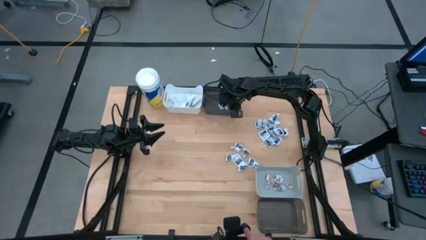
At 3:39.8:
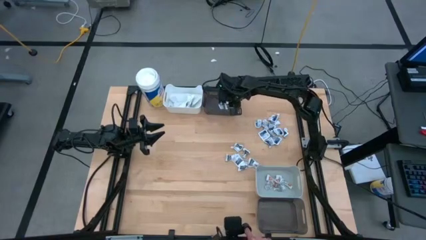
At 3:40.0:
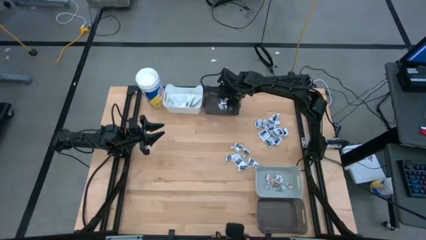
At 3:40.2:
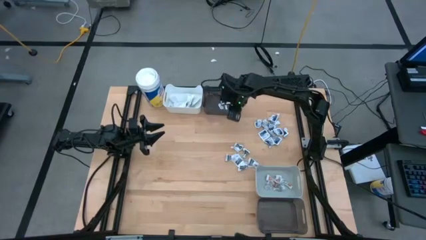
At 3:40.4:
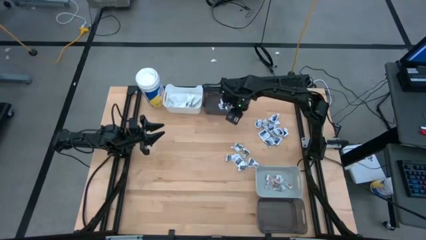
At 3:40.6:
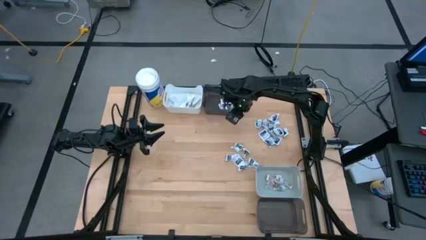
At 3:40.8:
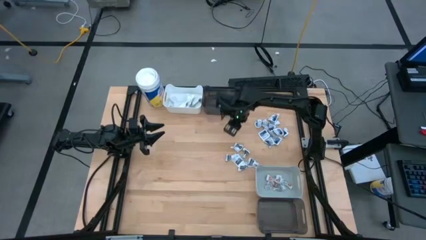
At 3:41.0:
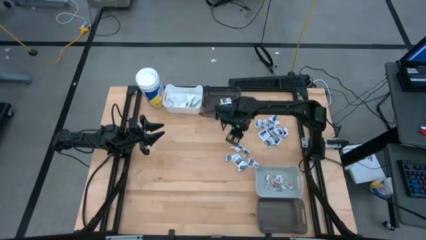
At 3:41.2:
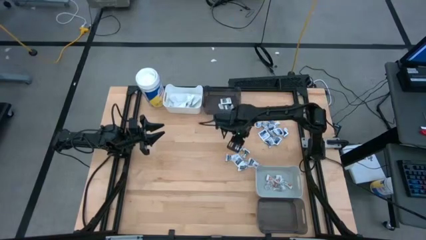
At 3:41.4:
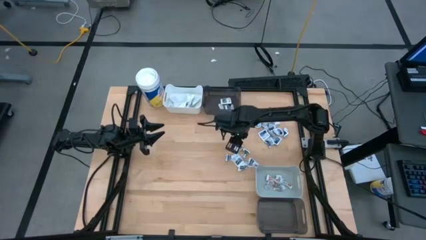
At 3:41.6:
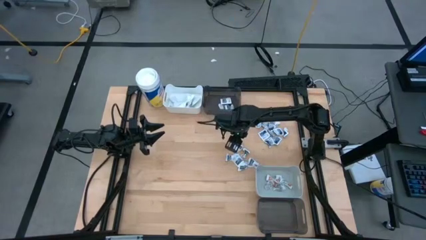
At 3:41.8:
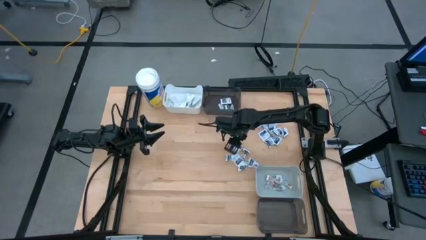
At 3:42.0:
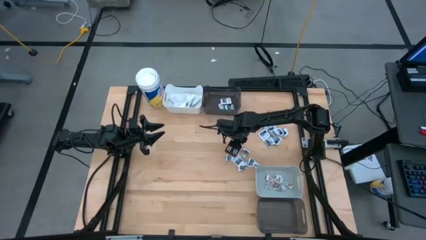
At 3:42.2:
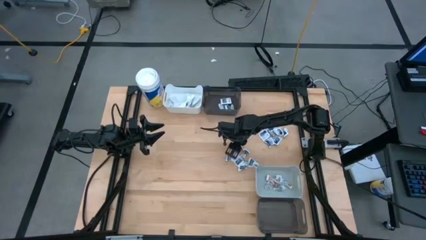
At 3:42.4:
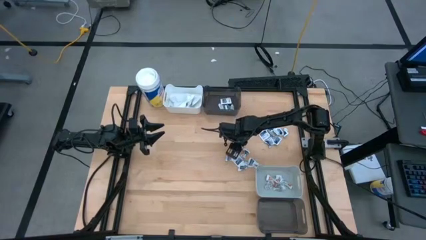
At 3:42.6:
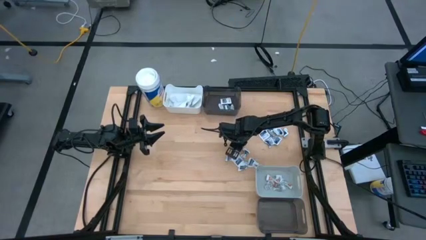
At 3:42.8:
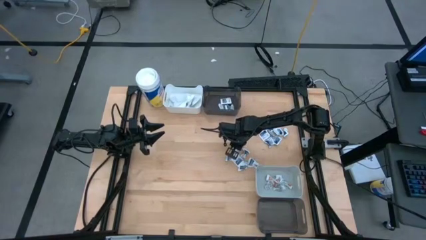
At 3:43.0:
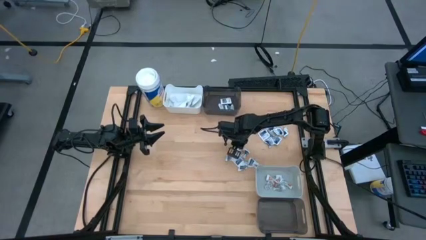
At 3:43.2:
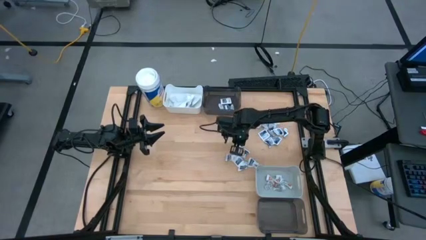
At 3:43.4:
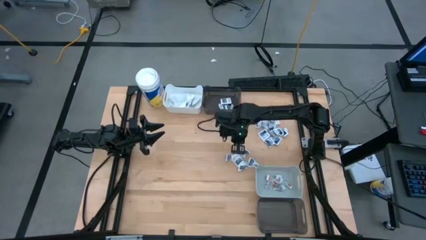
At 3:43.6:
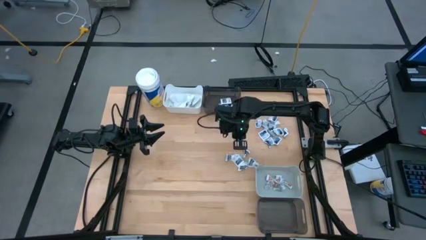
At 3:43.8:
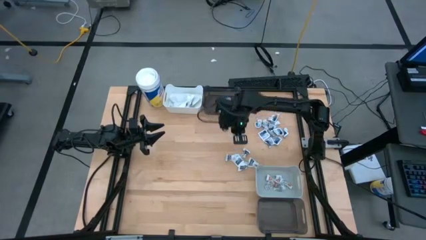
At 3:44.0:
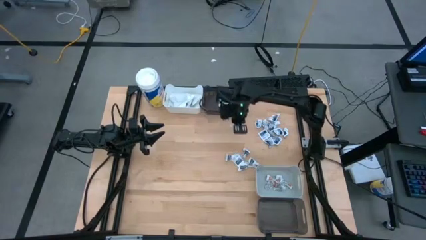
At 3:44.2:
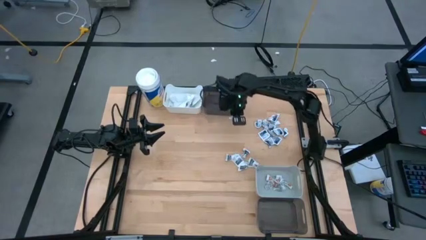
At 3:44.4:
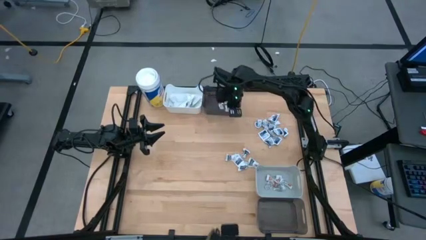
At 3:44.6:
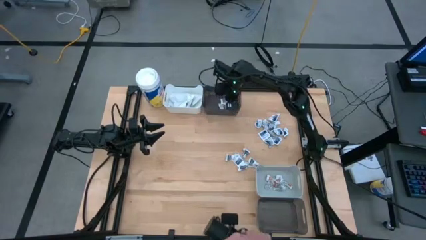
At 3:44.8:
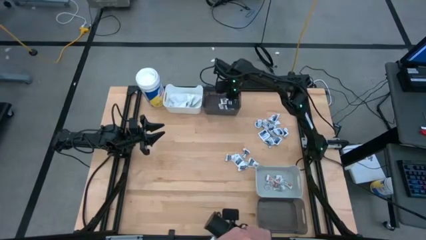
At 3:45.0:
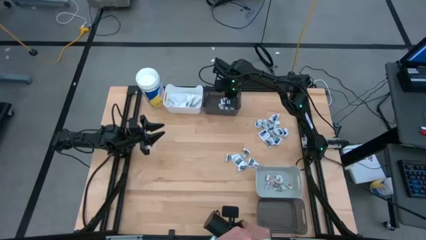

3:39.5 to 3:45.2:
Task: Pick & Place First Aid Supplies
Put the gray towelette pack into the top black bin

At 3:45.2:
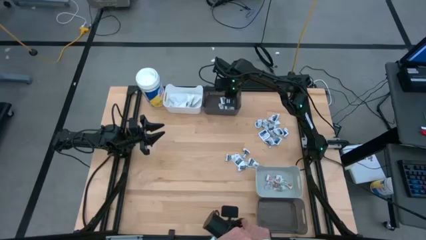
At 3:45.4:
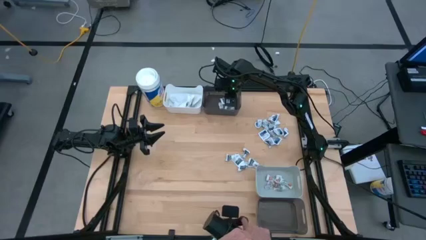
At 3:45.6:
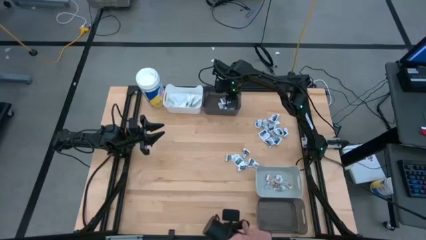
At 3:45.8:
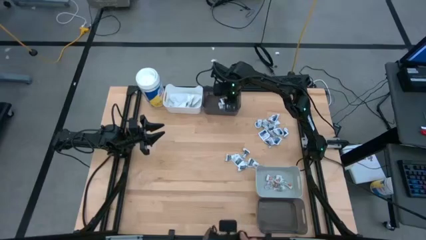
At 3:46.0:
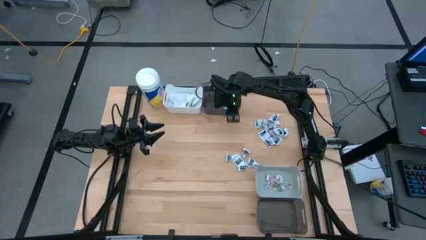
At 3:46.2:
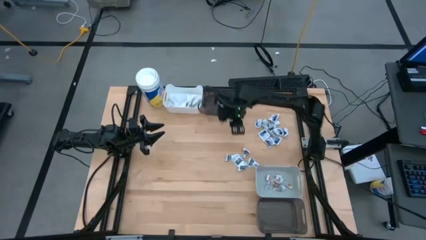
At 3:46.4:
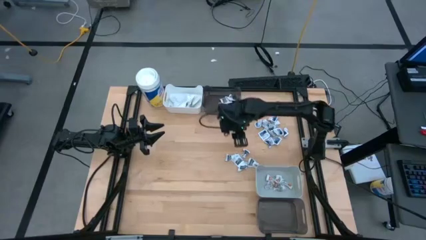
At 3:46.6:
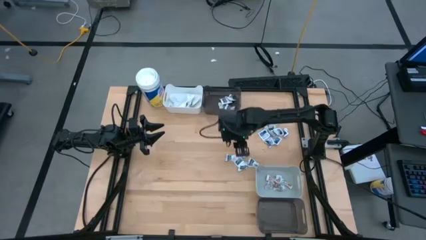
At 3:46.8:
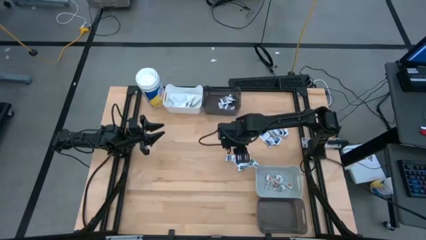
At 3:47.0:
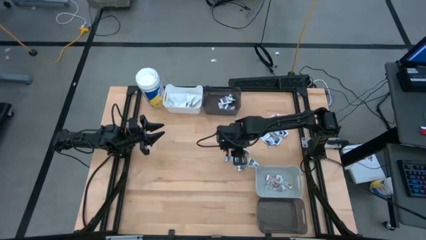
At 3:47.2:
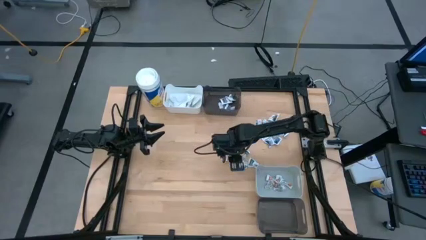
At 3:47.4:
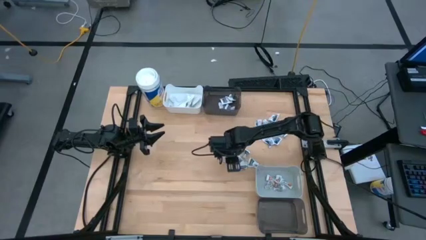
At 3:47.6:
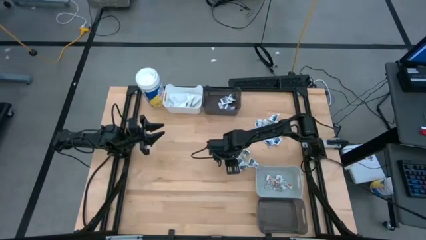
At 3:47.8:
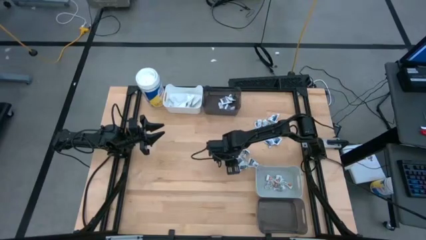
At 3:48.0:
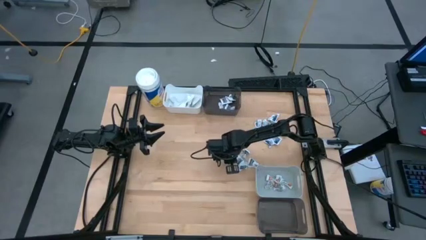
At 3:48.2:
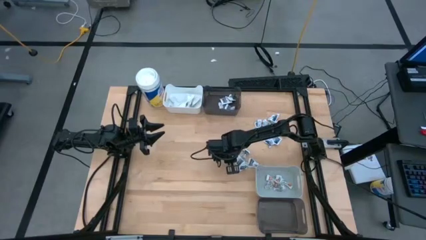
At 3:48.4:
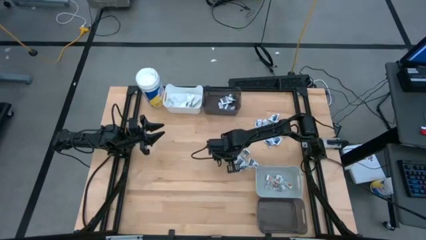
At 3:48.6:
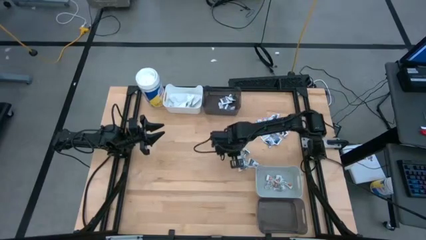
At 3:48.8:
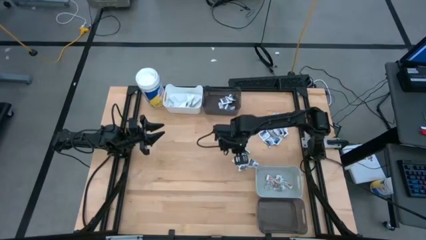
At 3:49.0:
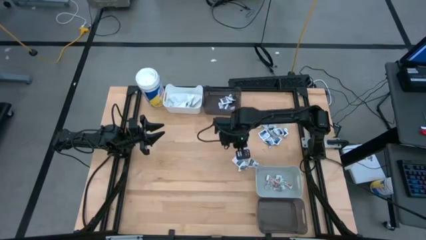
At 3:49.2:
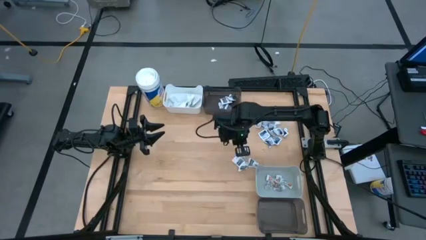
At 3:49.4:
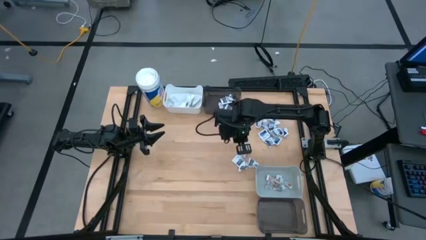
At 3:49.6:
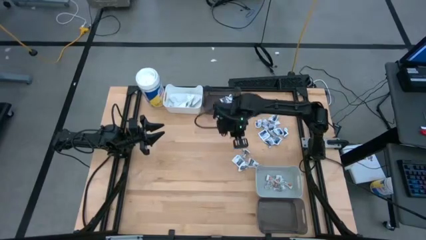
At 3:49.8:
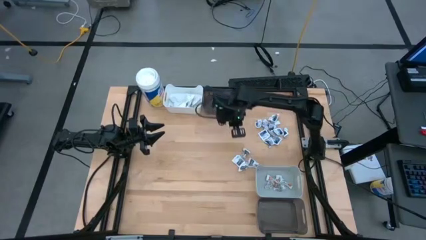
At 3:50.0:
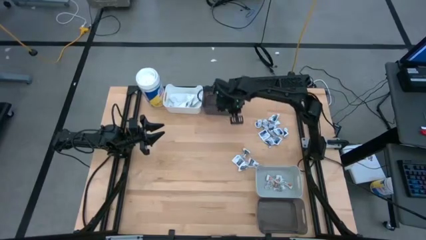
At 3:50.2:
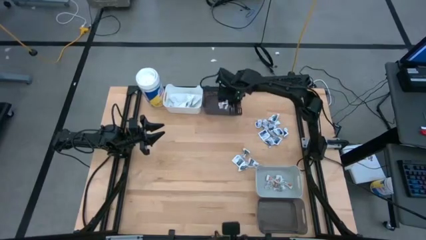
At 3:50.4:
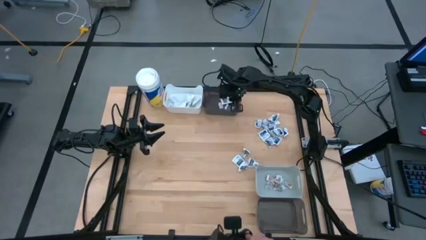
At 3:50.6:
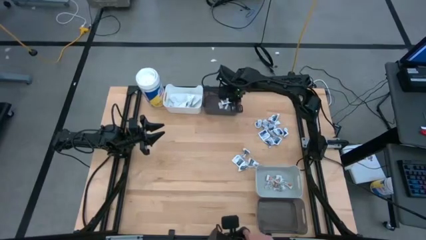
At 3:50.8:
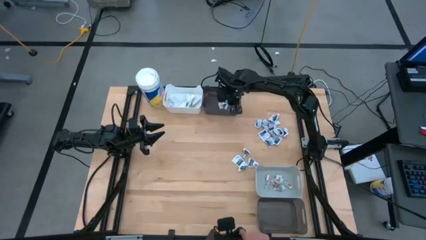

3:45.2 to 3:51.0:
Put the gray towelette pack into the top black bin

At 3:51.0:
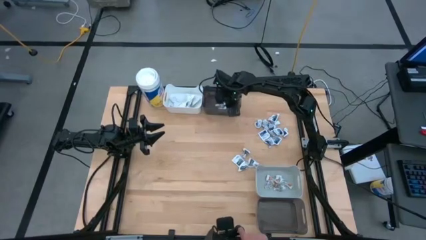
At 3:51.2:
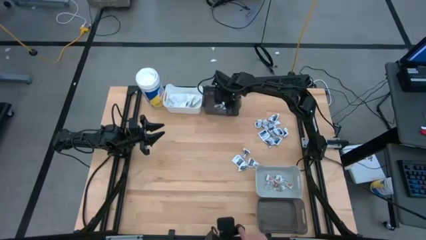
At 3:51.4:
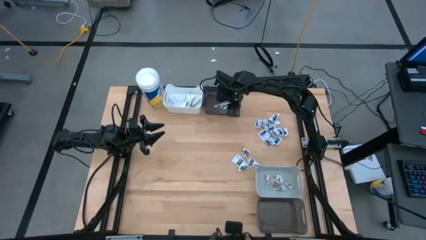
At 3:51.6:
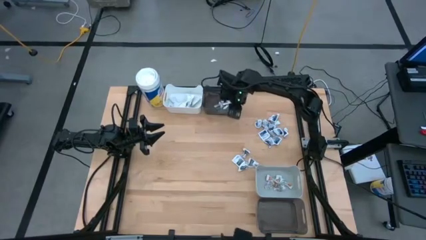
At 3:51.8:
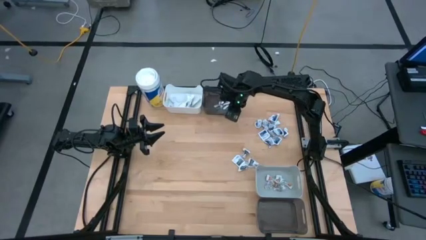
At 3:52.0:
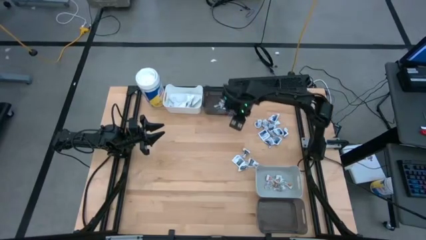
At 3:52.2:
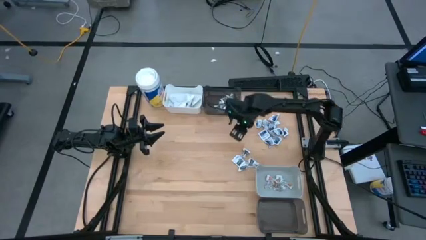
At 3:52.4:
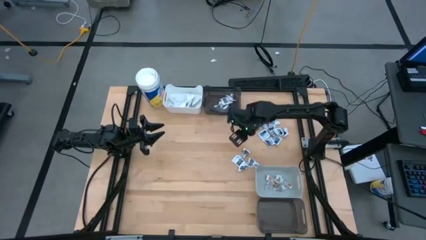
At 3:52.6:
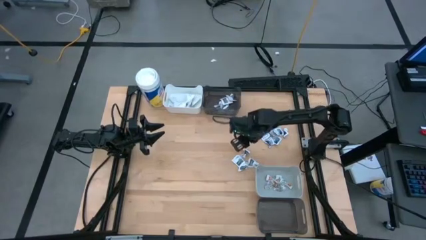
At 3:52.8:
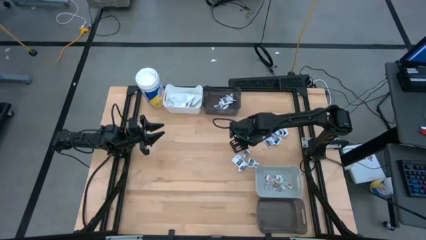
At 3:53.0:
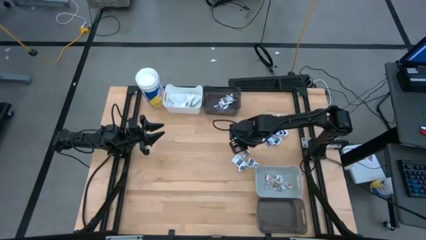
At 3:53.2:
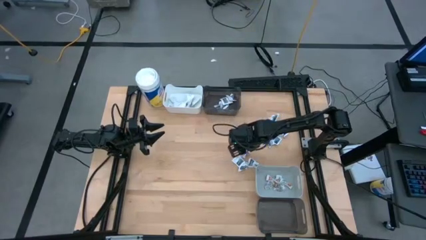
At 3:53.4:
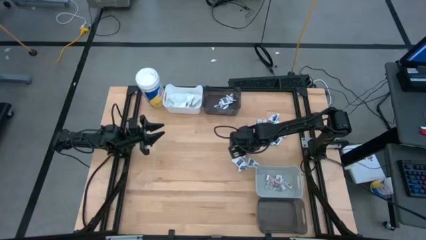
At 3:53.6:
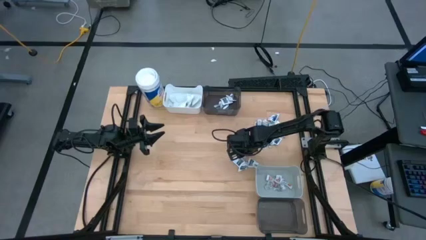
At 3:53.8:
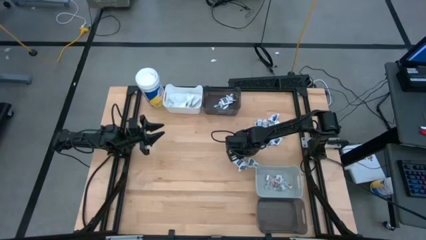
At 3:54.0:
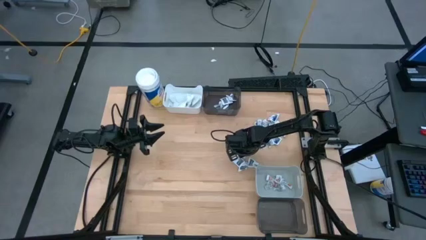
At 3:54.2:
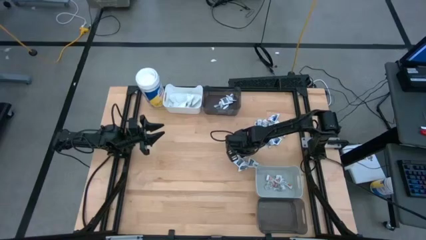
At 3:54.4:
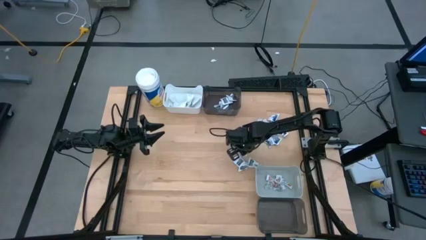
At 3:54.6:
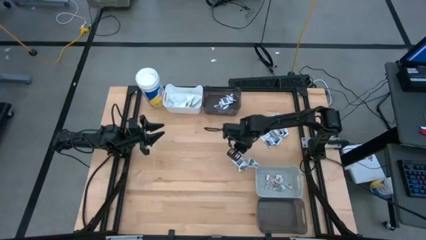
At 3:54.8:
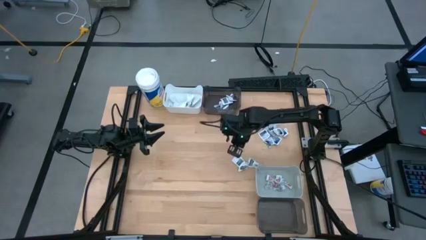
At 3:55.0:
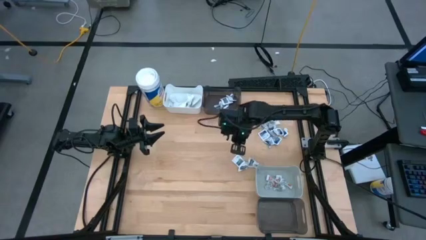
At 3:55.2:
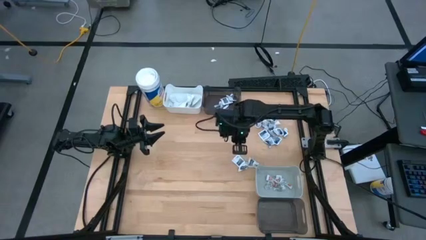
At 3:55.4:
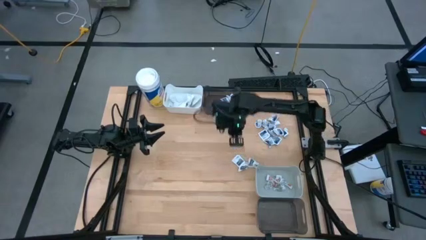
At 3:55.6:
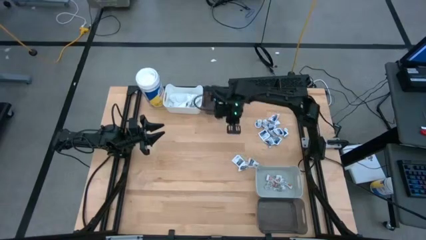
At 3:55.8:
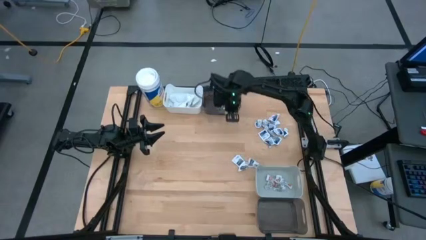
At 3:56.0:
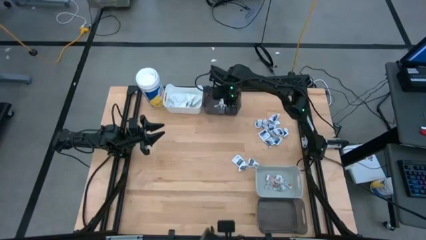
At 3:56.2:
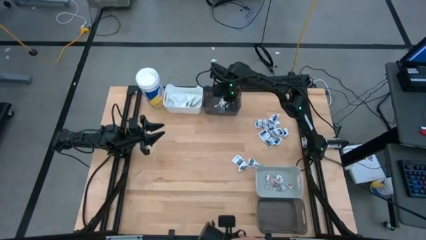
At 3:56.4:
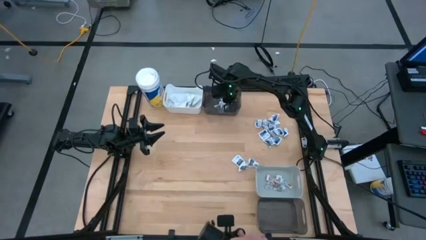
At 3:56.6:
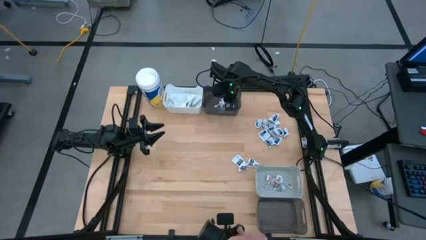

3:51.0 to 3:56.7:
Put the gray towelette pack into the top black bin
